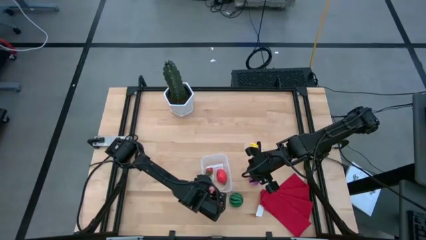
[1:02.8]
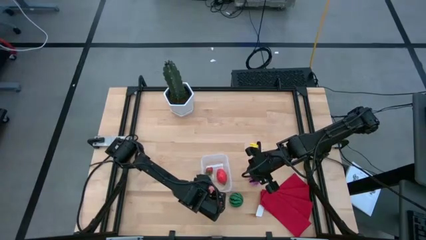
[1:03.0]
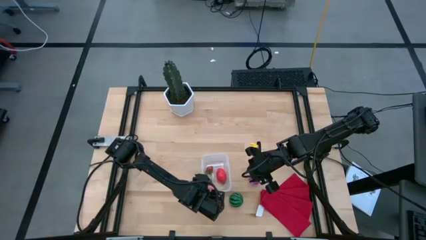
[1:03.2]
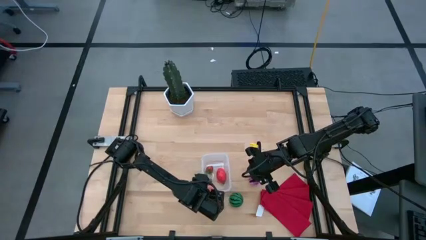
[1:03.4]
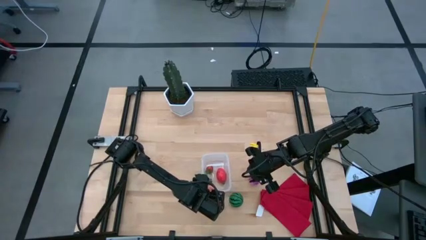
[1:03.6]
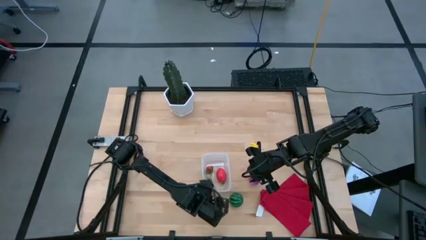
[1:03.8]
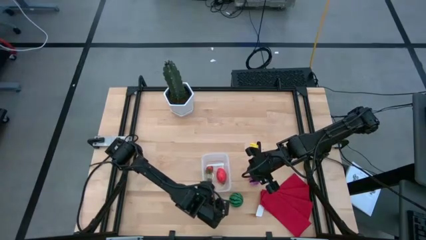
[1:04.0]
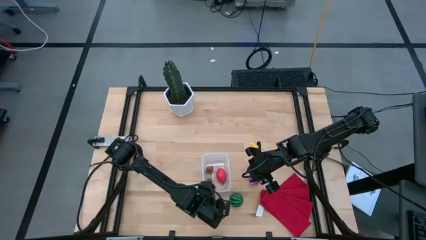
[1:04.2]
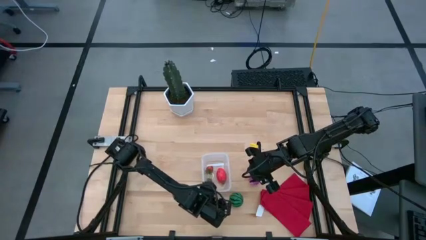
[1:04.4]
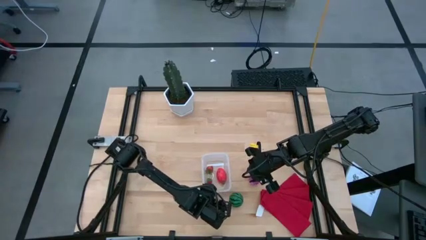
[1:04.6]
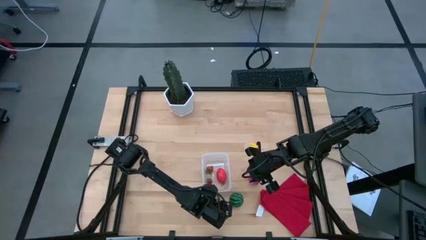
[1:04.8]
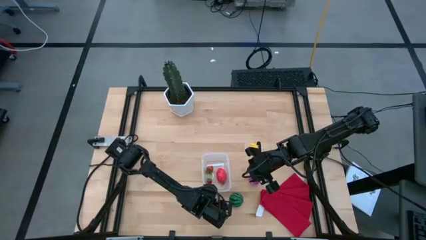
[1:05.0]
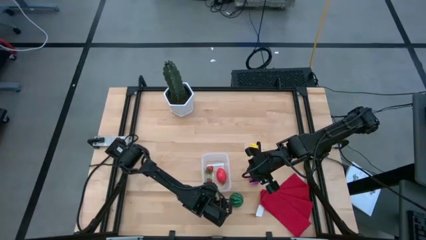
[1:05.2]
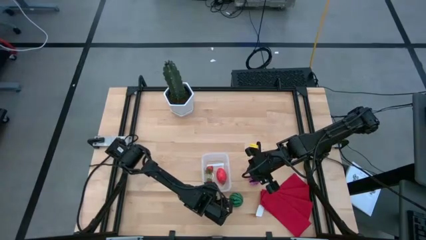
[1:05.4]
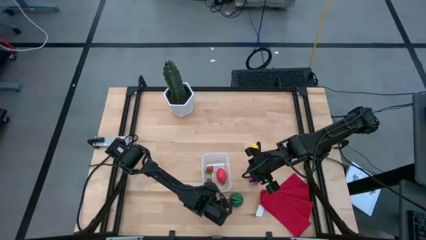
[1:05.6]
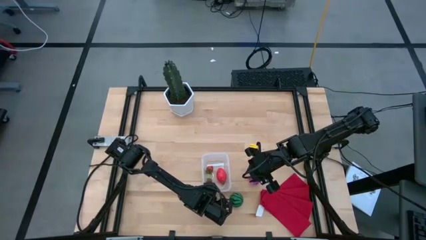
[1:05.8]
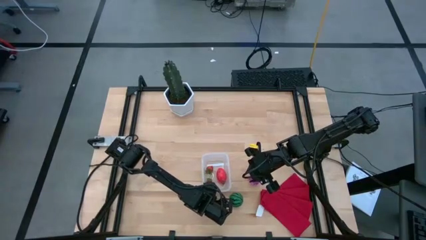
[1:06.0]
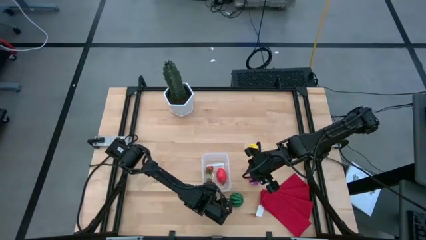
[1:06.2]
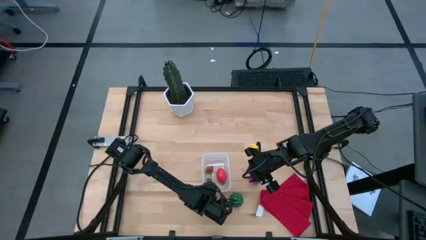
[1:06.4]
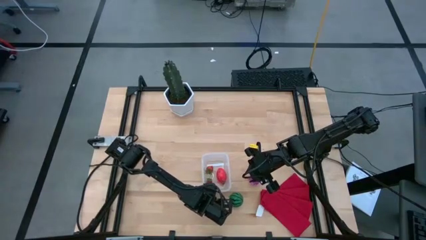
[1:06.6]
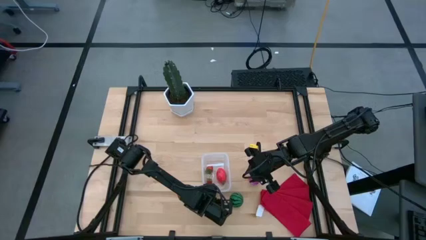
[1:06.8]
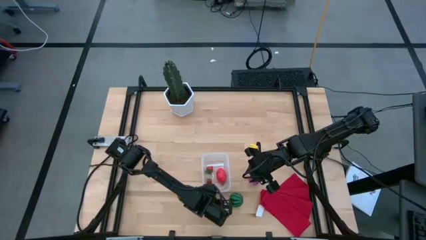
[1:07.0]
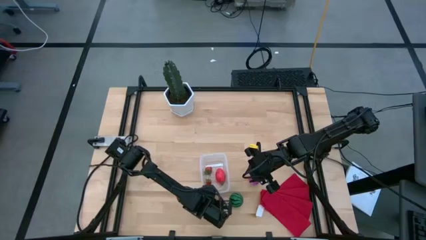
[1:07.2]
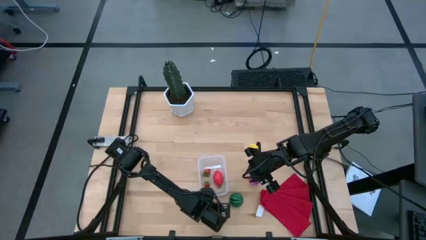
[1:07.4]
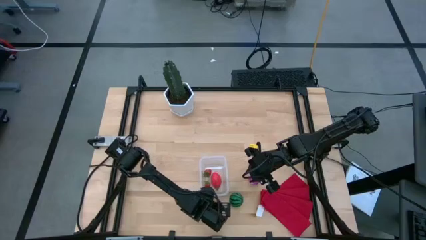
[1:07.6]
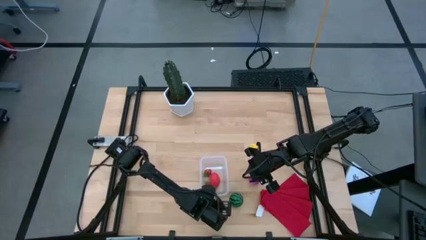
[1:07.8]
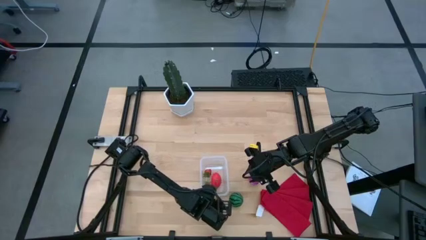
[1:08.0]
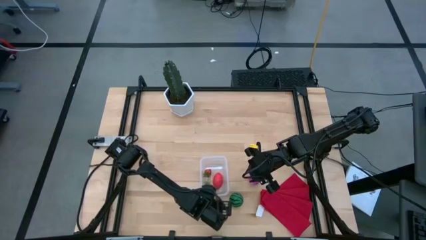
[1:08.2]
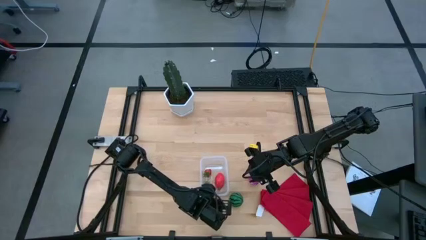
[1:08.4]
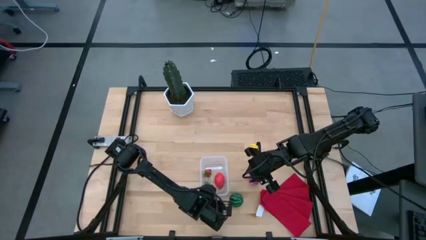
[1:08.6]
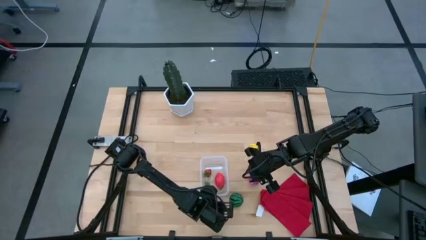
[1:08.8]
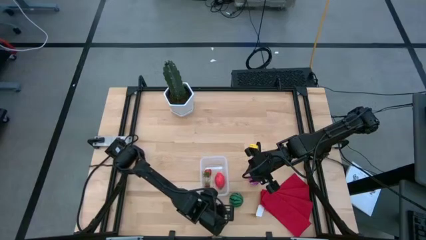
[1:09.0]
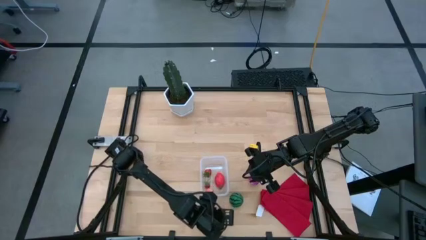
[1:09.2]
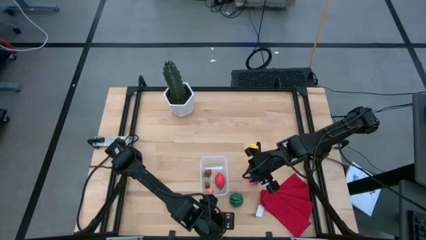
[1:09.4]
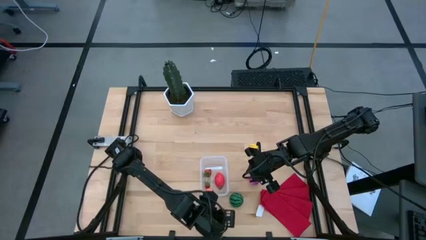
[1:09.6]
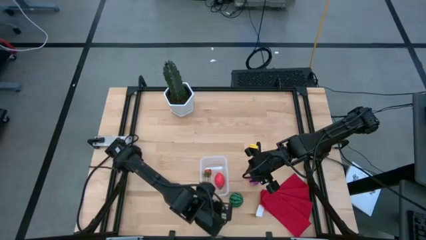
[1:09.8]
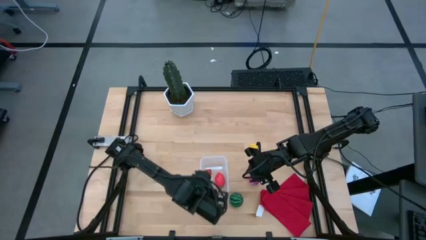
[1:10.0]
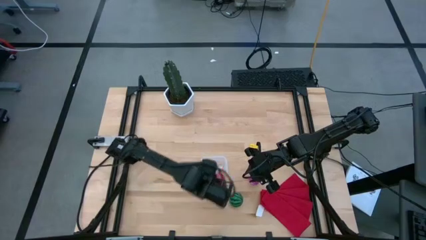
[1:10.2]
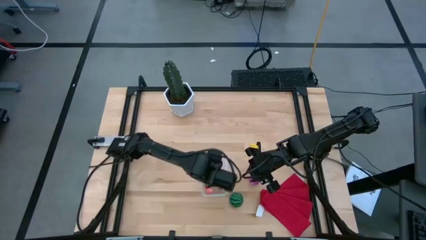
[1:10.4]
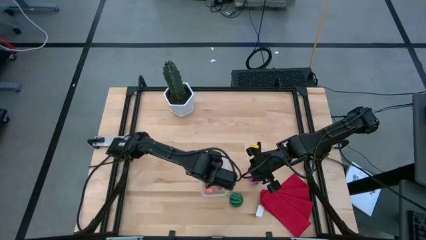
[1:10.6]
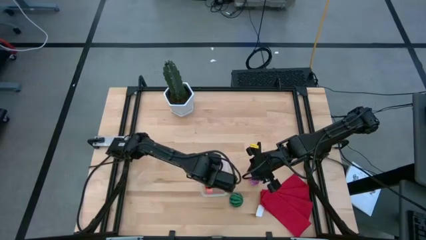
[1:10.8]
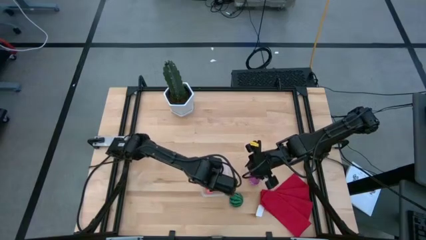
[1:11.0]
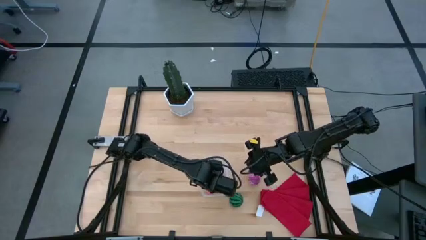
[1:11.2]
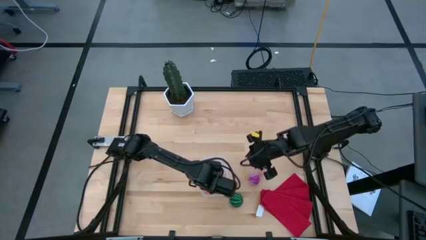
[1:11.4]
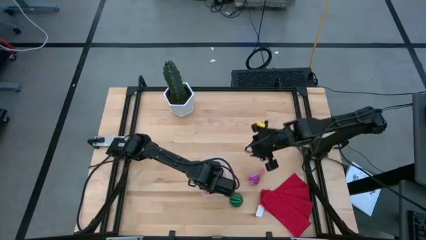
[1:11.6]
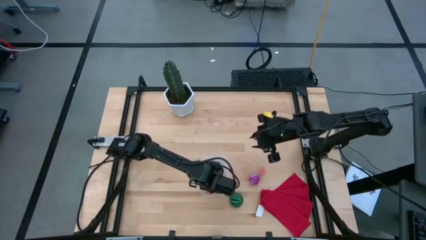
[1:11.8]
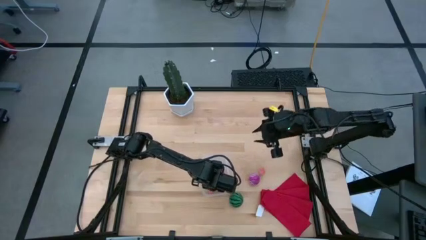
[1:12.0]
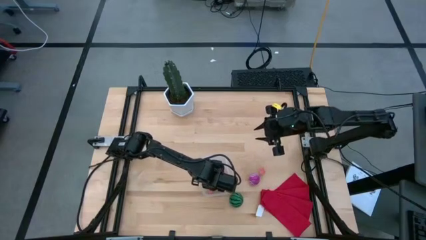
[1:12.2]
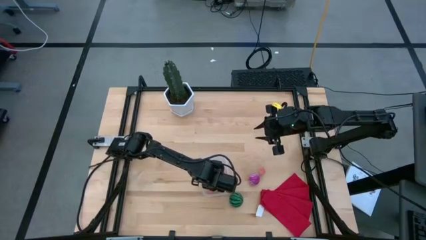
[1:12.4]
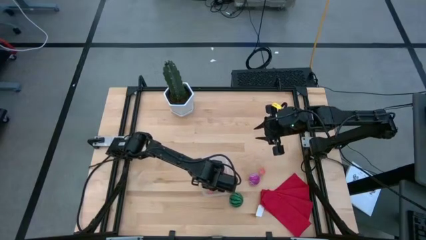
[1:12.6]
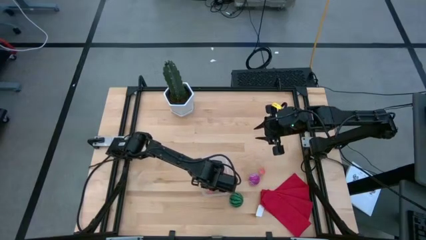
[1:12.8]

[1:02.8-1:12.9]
Task: Pick and placing Produce into tupperware
Put the strawberry into the transparent white bin

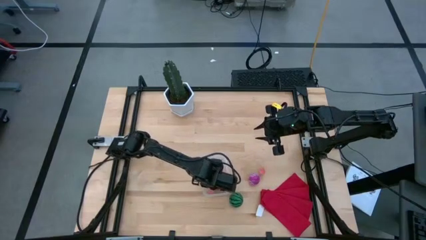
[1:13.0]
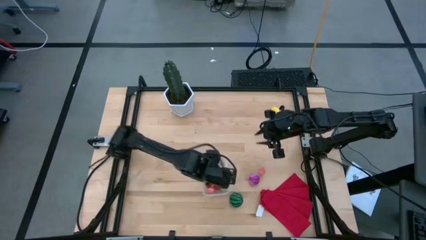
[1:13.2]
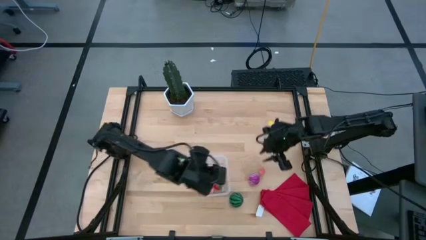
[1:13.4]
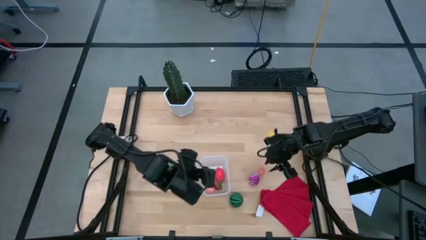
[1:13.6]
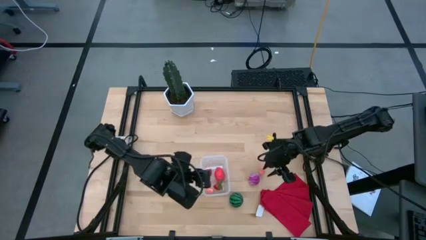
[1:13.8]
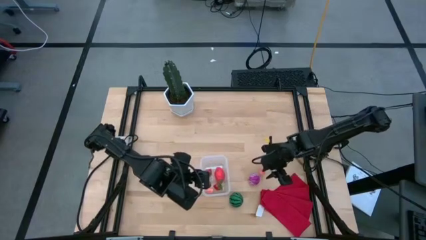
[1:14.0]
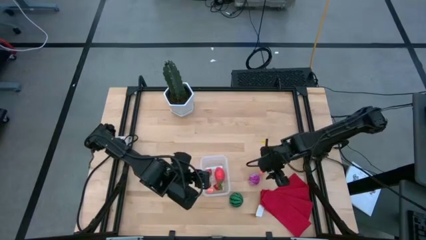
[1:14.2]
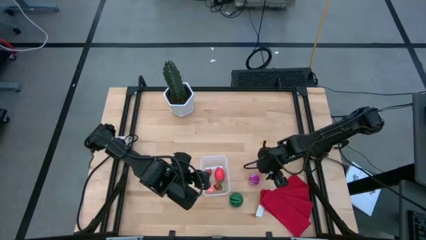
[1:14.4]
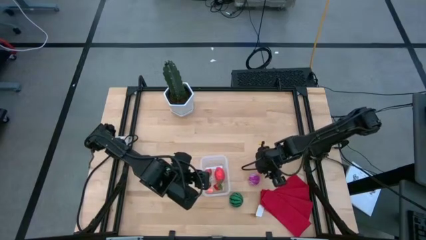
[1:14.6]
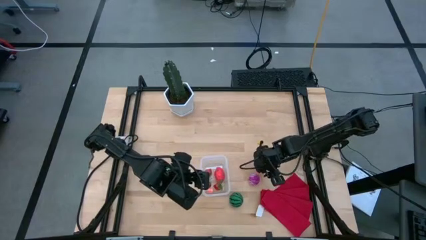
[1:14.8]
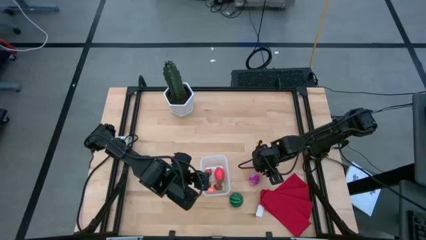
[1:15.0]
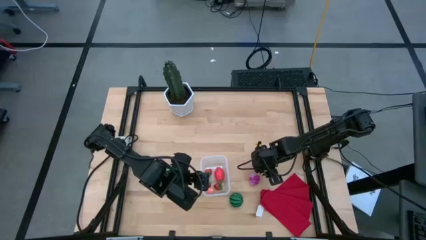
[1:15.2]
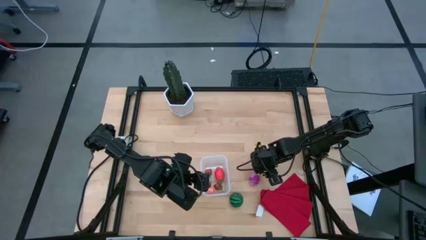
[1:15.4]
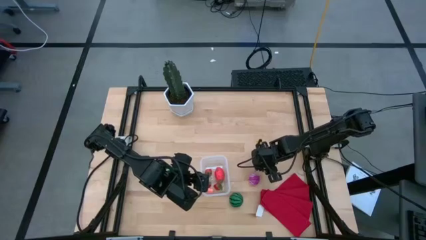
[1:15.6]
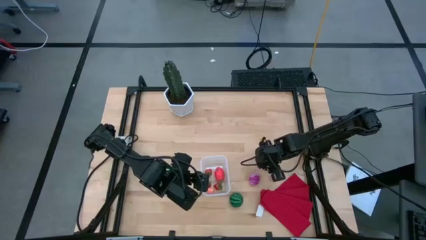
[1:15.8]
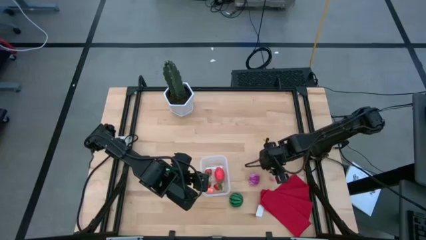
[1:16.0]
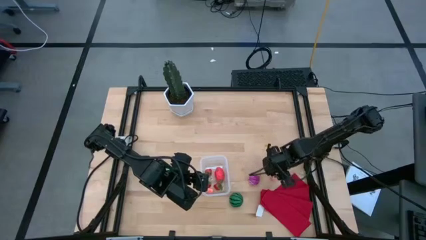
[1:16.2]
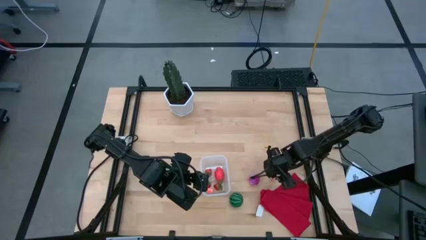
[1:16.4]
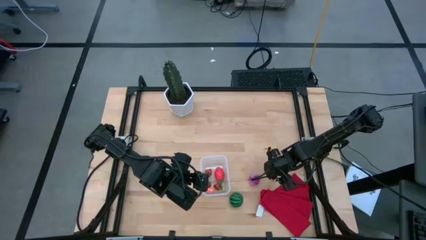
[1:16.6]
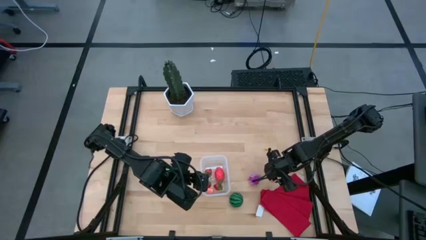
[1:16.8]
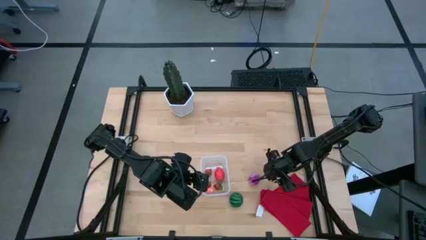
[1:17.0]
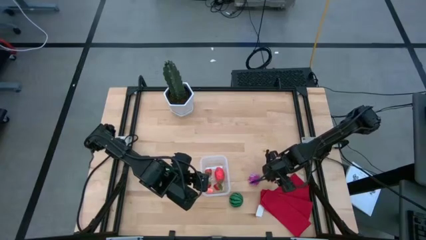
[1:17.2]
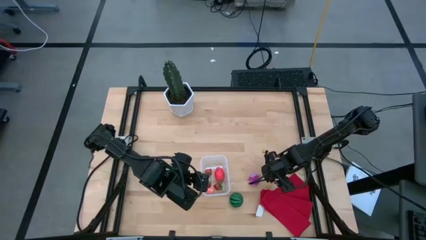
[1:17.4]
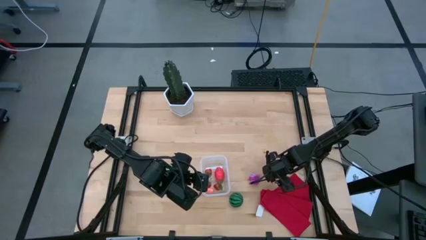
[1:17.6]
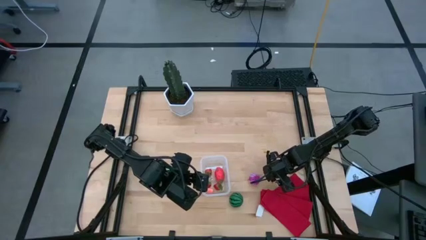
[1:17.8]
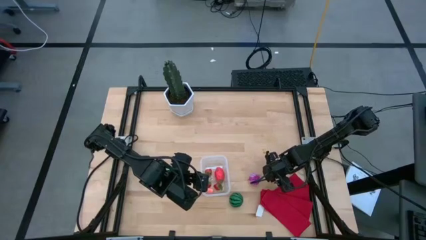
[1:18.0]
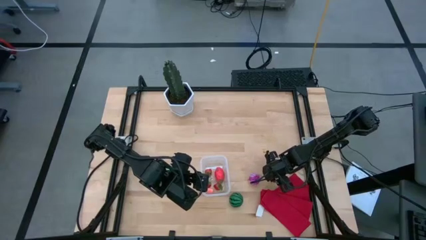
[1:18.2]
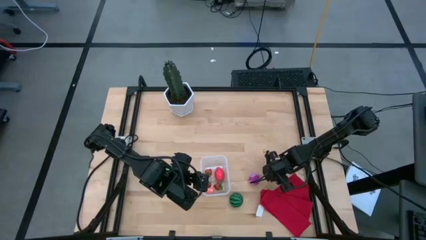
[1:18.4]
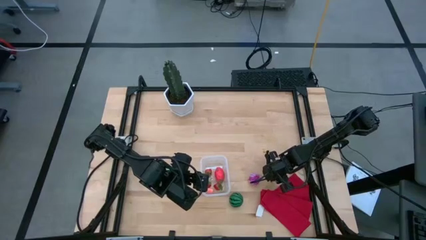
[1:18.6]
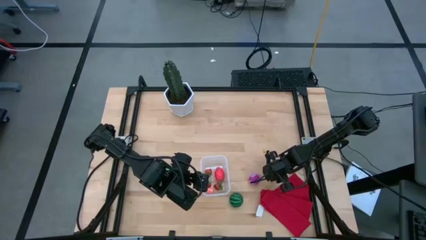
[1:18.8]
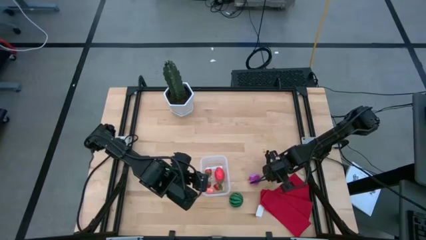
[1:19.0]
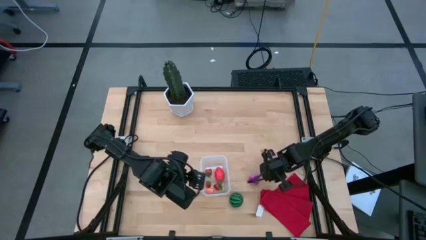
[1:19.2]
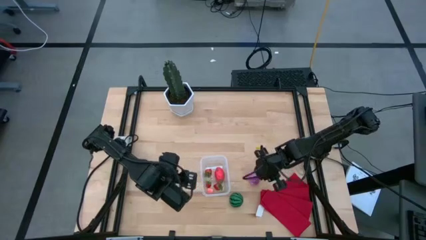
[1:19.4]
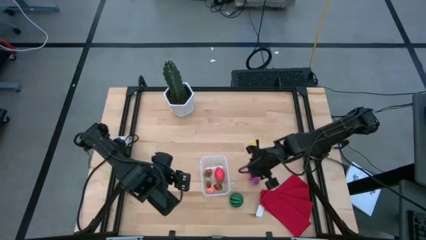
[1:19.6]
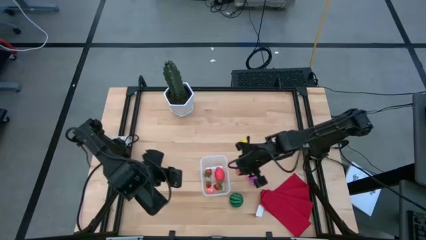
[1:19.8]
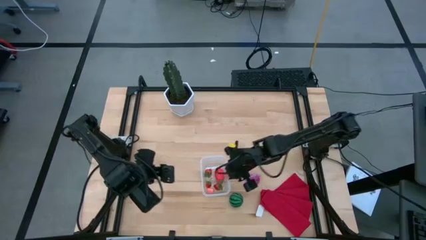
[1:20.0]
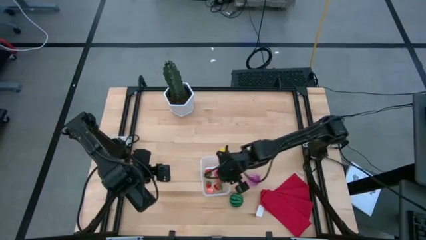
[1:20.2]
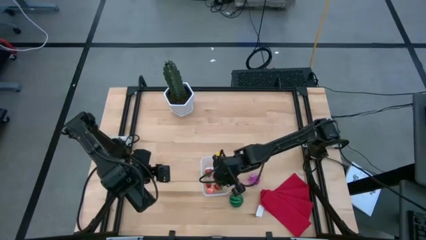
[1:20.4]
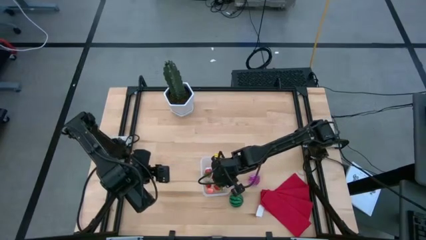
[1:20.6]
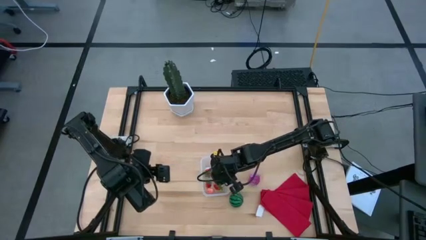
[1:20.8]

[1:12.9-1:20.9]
Put the peach into the transparent bin
